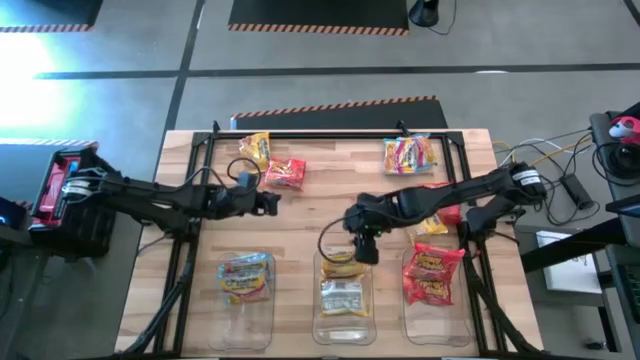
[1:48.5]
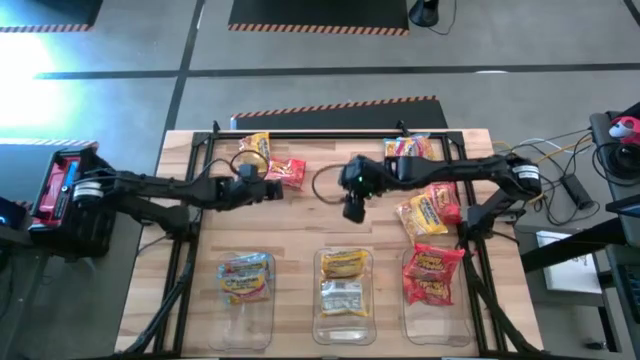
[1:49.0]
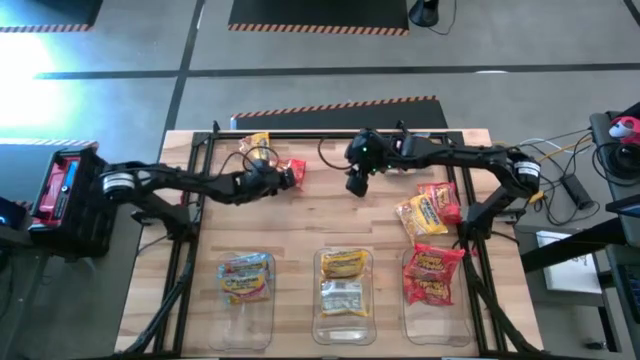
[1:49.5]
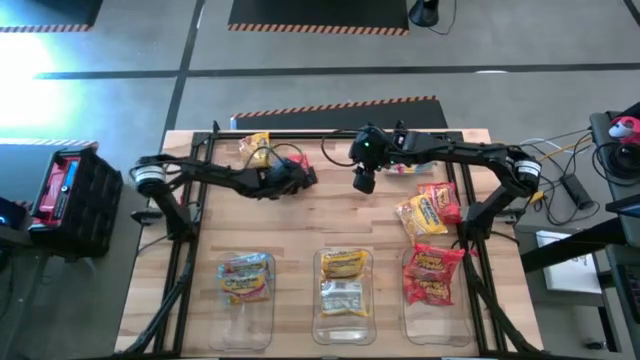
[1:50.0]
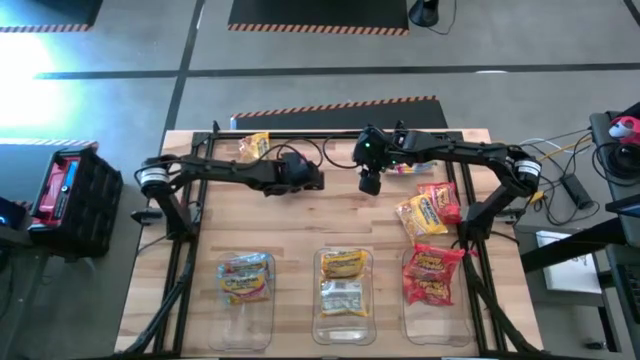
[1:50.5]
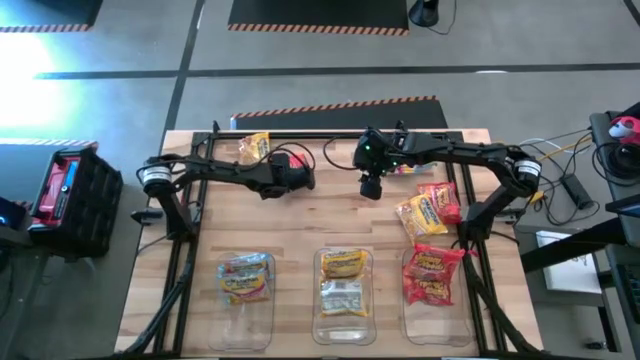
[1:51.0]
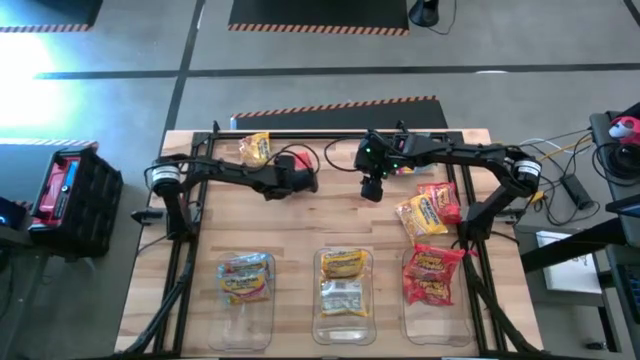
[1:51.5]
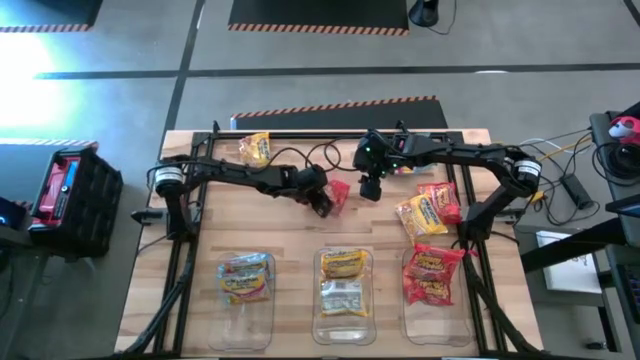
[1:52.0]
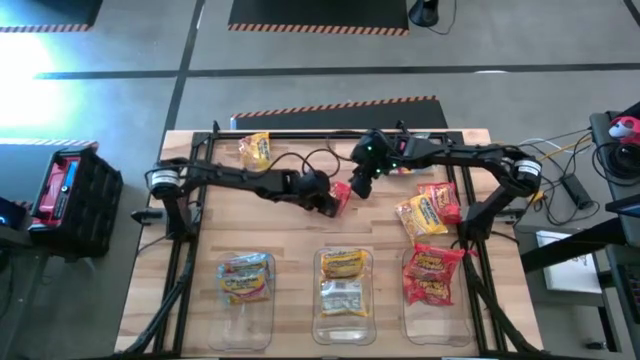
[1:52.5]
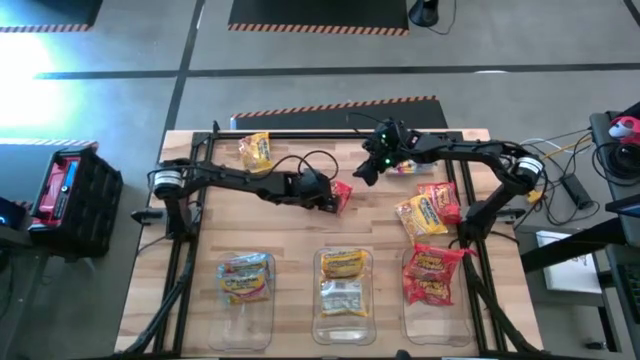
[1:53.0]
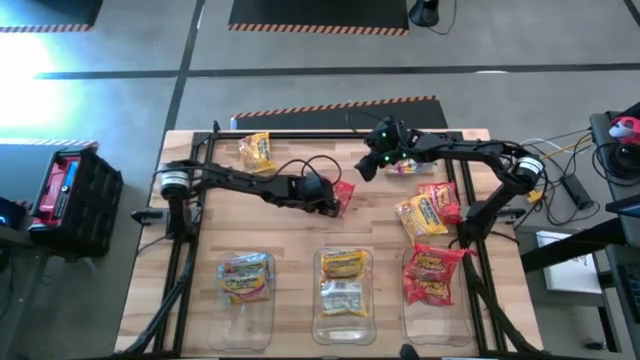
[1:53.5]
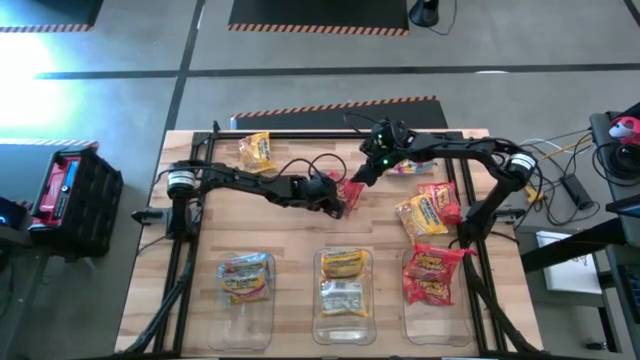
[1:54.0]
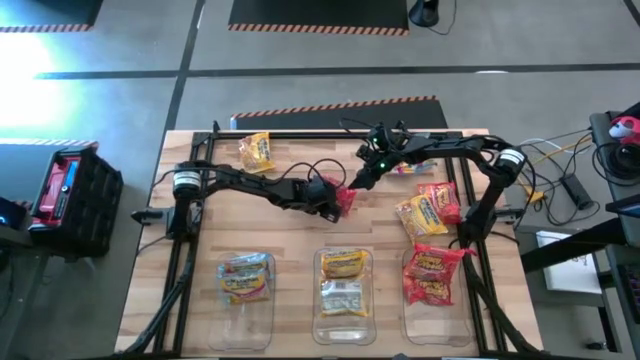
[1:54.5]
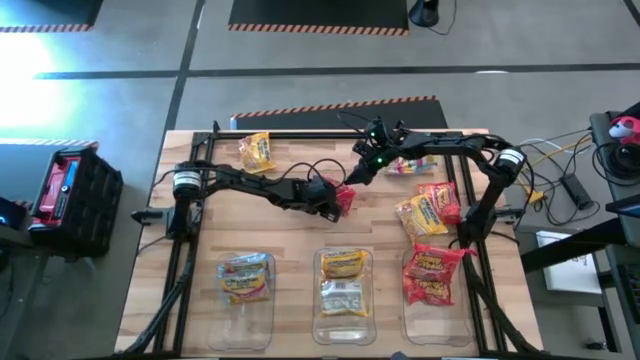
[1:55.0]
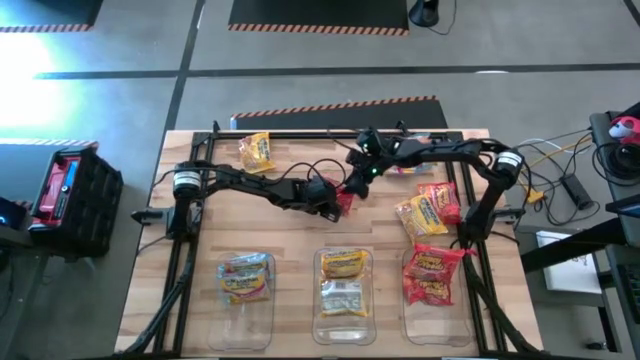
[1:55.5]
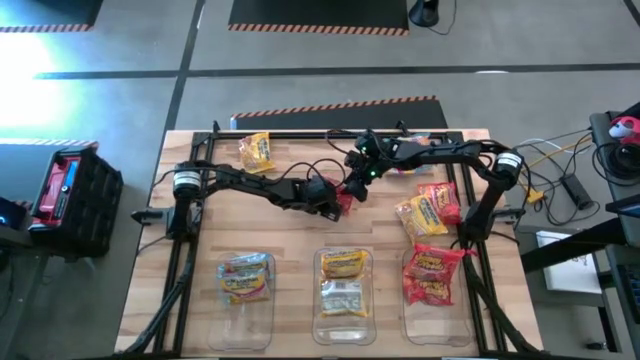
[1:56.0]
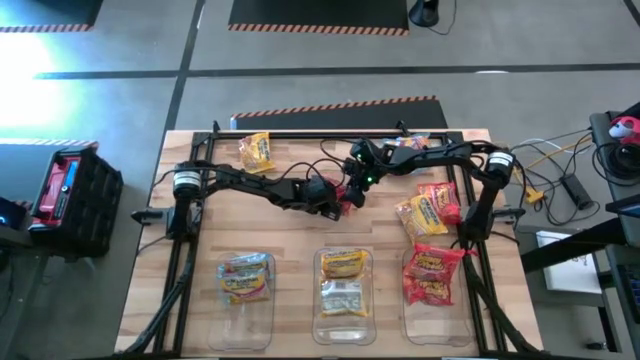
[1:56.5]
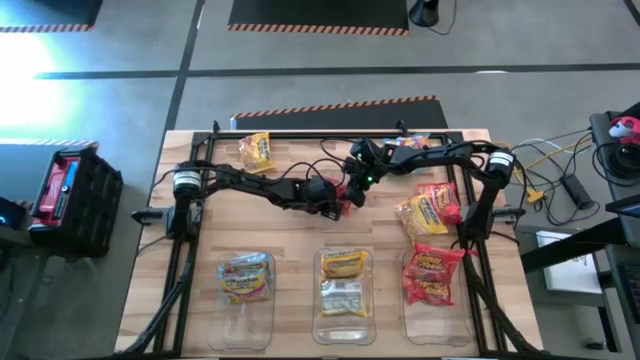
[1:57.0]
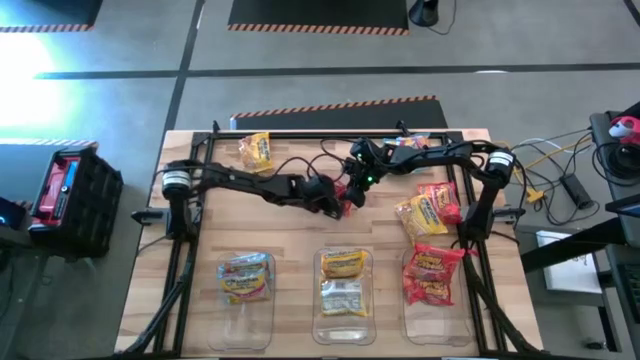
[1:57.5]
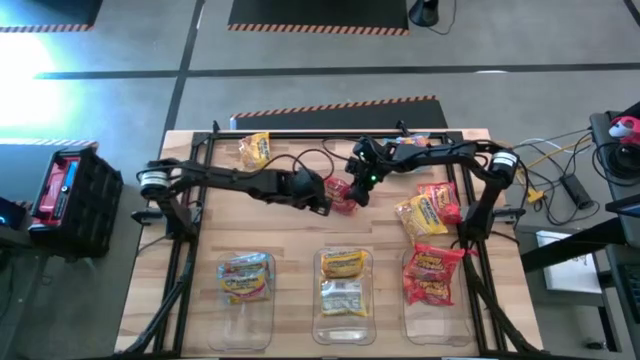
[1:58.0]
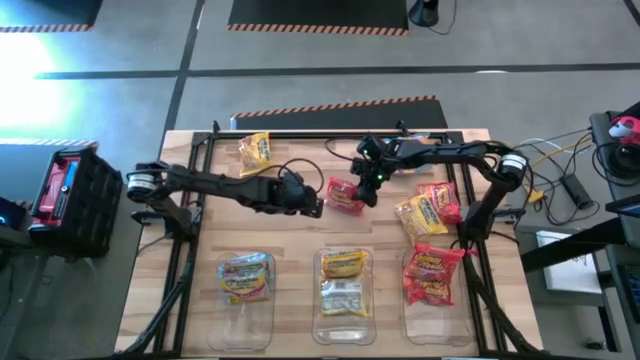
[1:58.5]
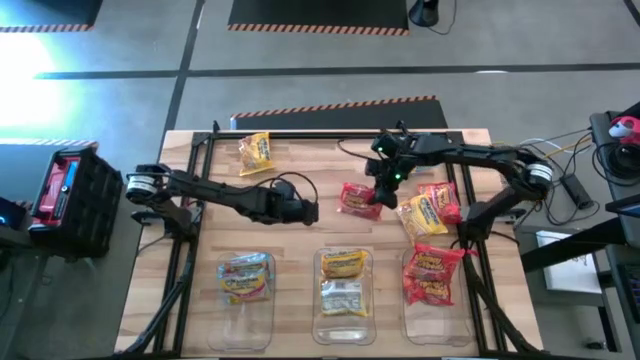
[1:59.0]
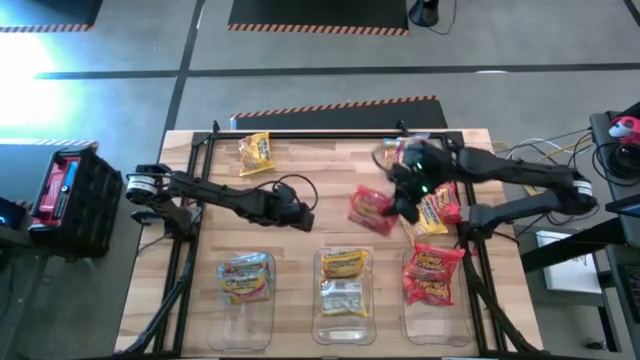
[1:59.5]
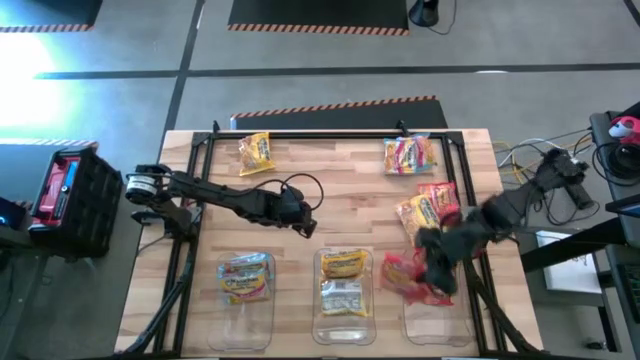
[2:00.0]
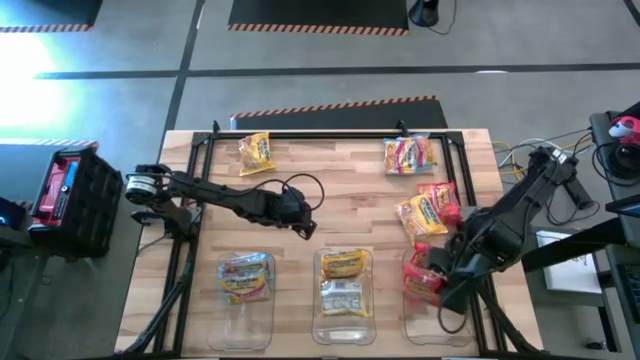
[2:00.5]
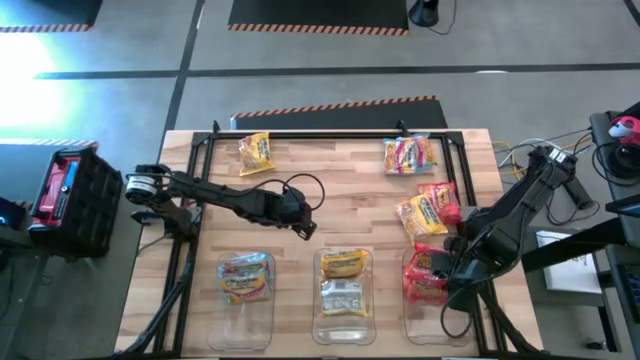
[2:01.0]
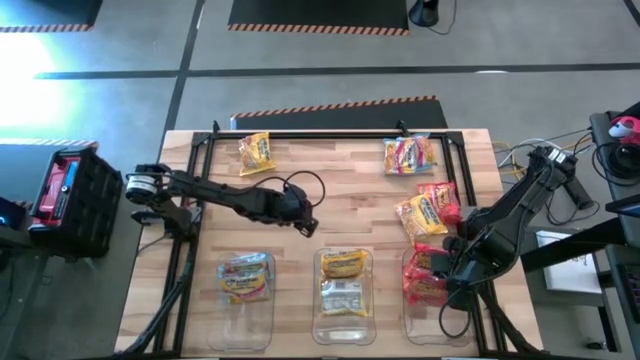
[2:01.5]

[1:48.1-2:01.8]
Task: Sort Maruchan noodles
Put the orange noodle pack into the right transparent bin
